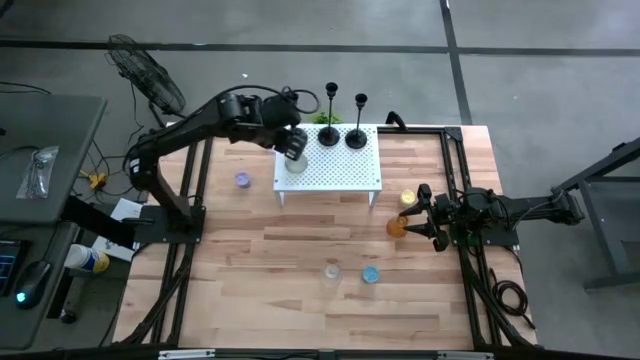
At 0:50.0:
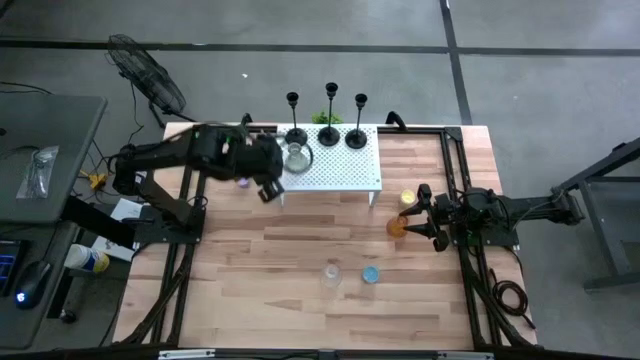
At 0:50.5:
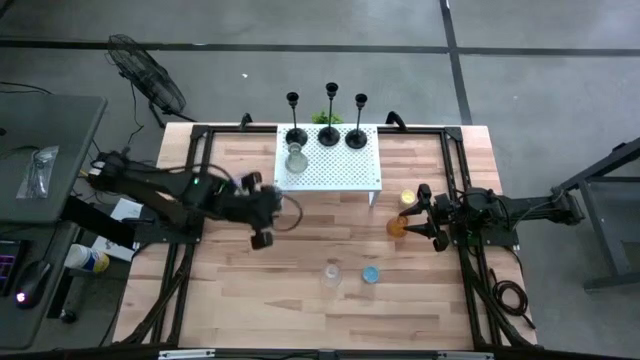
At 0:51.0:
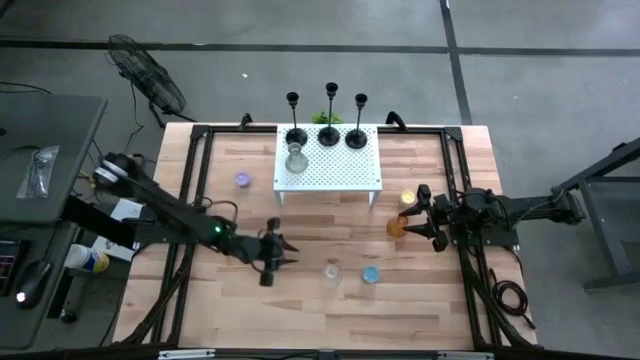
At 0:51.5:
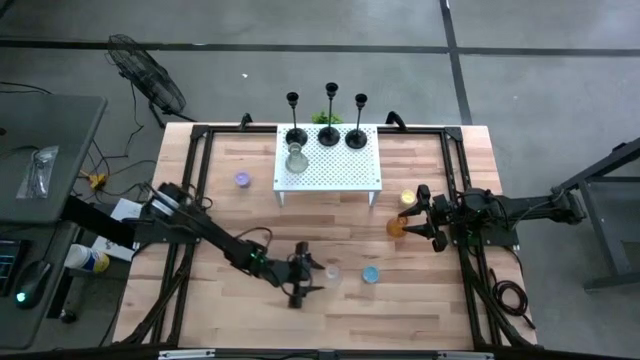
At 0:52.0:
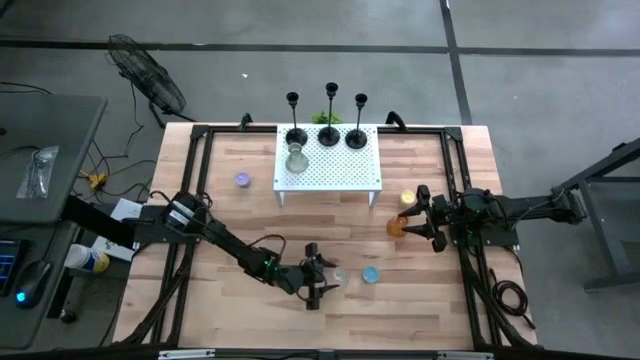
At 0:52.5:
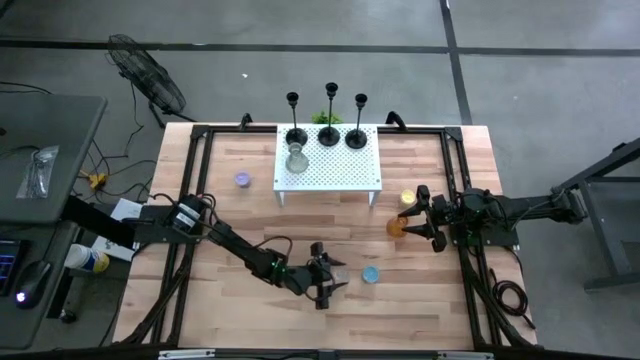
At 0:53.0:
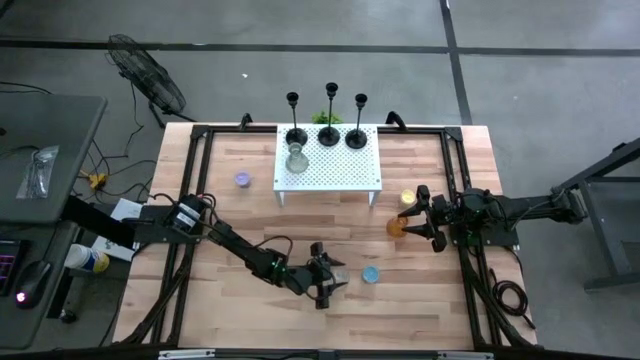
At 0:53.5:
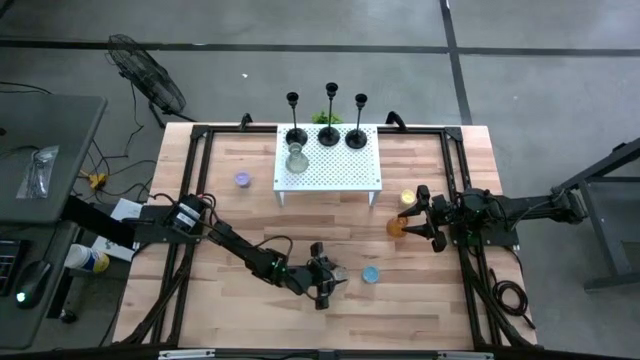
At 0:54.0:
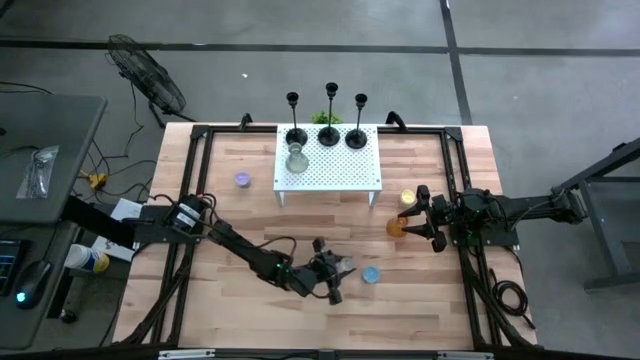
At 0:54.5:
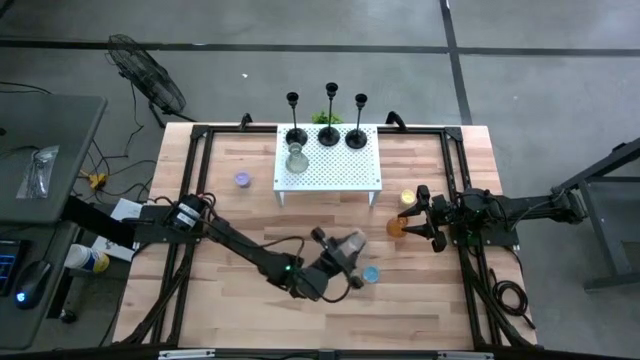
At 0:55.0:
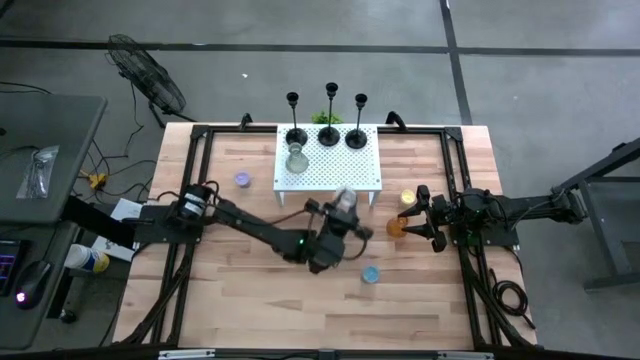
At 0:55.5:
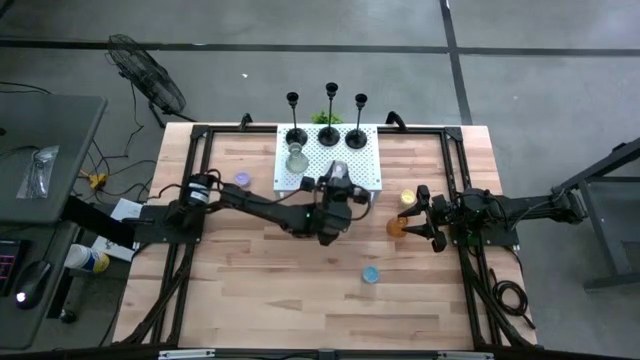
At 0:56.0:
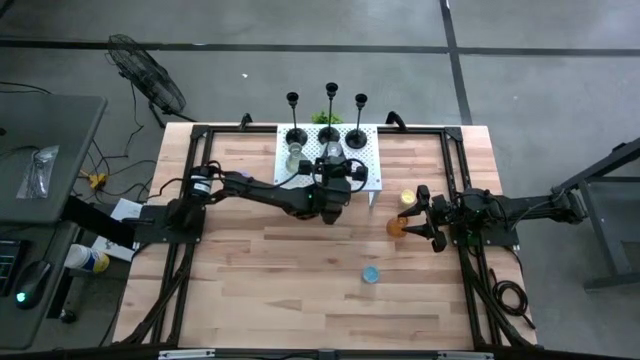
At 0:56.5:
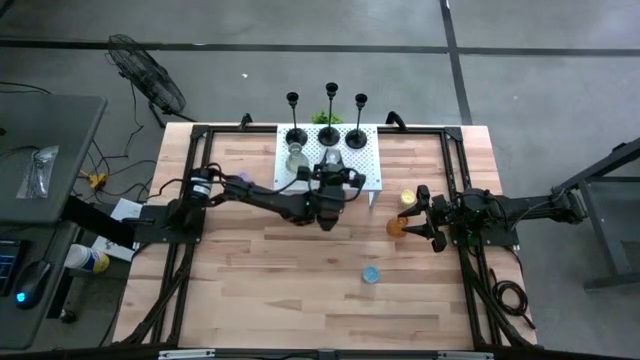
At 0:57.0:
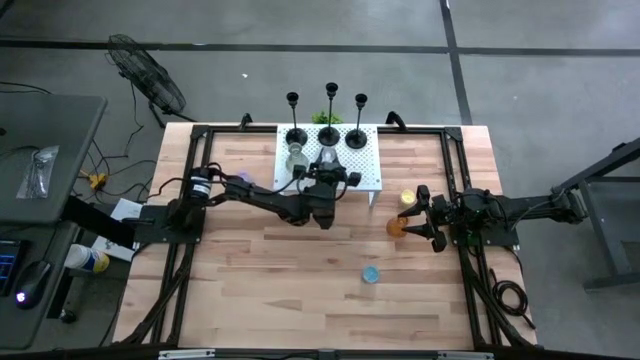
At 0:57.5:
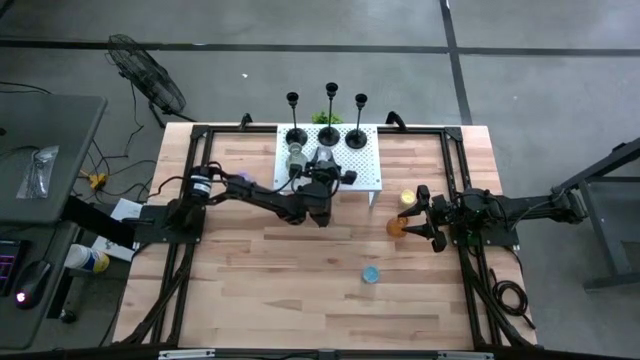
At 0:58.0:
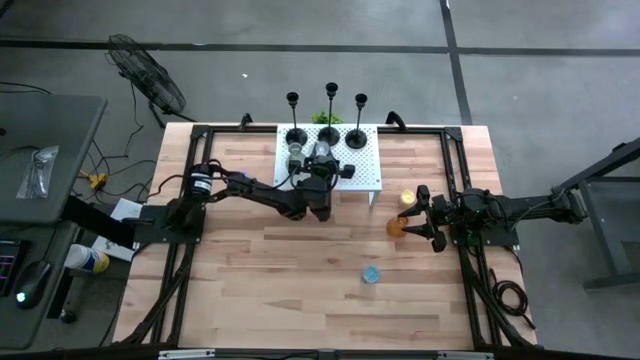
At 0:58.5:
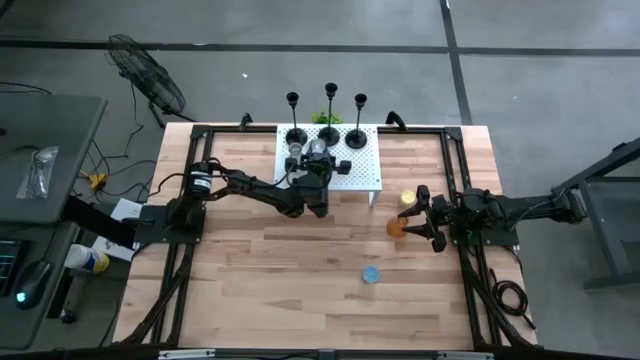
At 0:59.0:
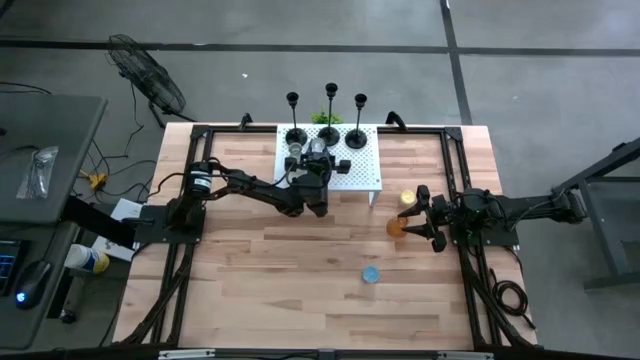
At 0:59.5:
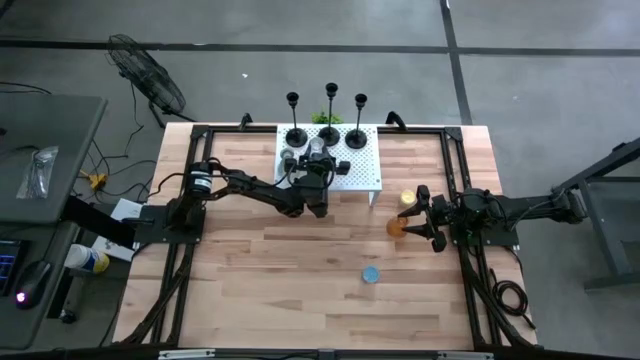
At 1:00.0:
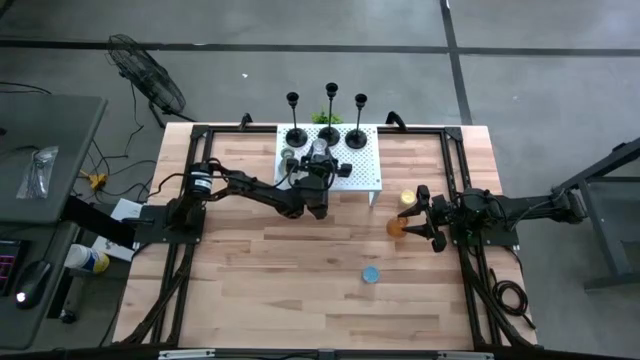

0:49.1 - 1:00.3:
Task: Pick & Place candle stick holders
Put the transparent candle holder on the shelf aligned with the green candle holder

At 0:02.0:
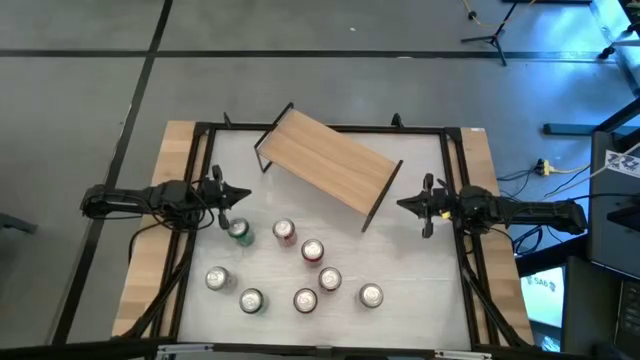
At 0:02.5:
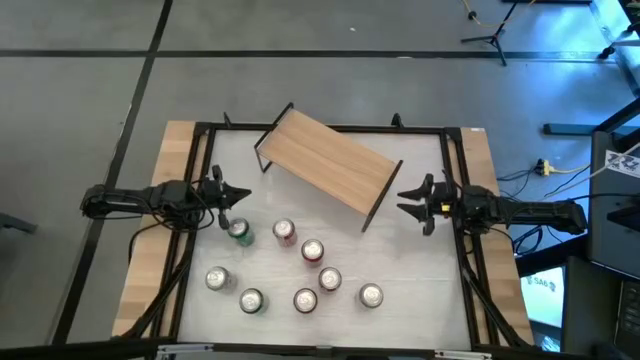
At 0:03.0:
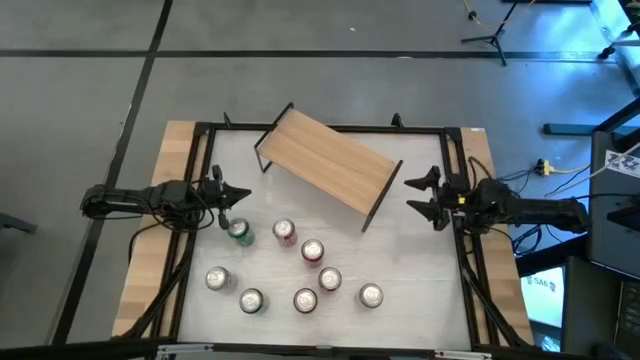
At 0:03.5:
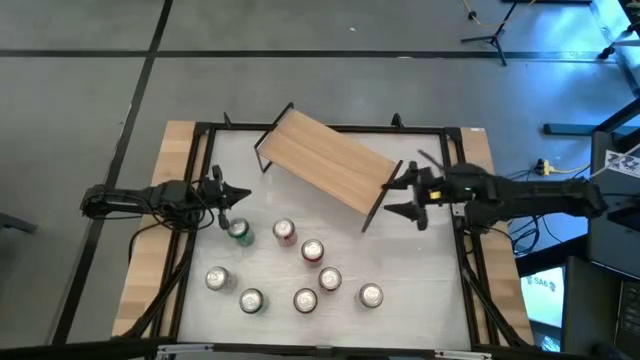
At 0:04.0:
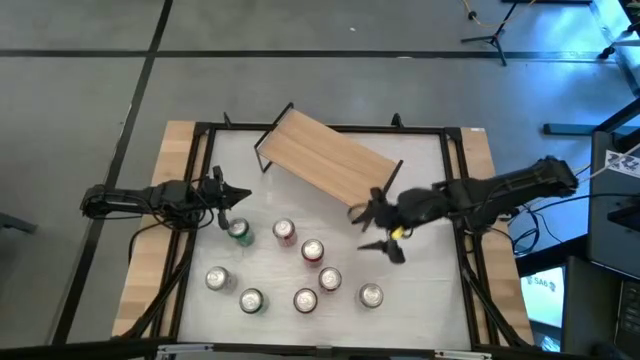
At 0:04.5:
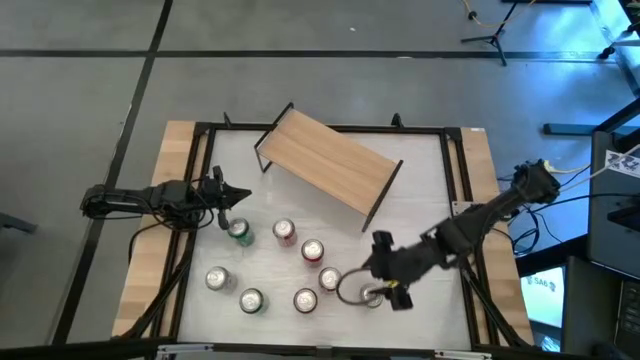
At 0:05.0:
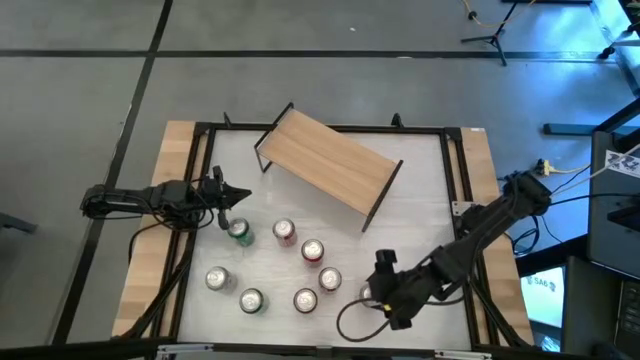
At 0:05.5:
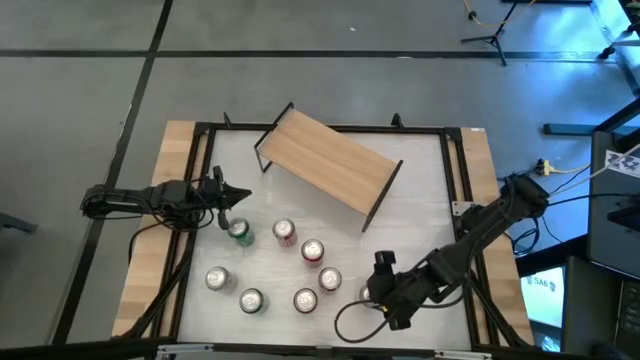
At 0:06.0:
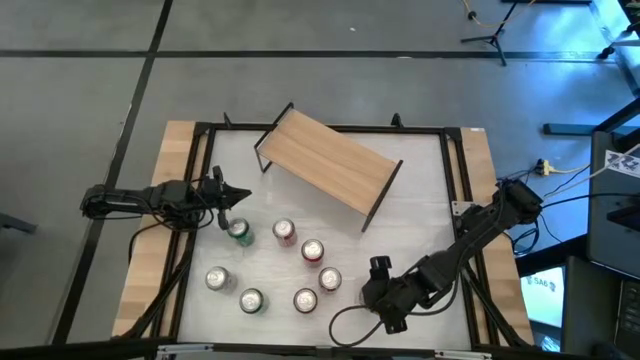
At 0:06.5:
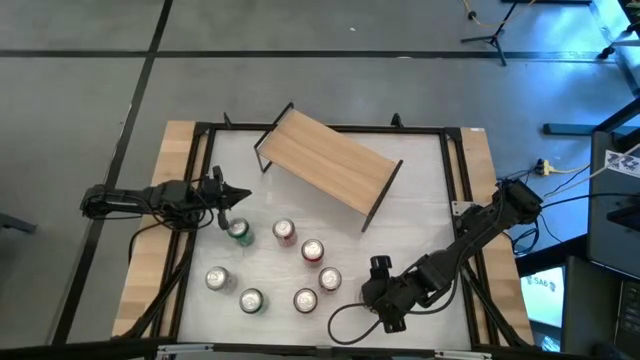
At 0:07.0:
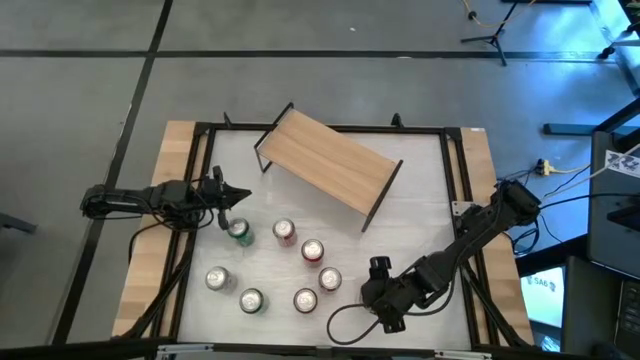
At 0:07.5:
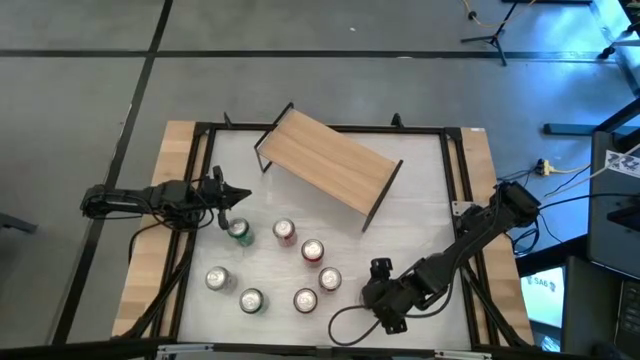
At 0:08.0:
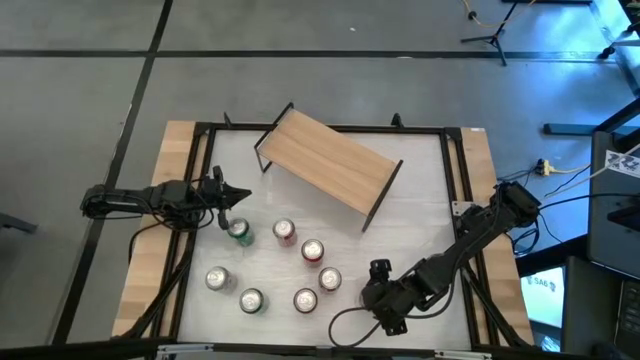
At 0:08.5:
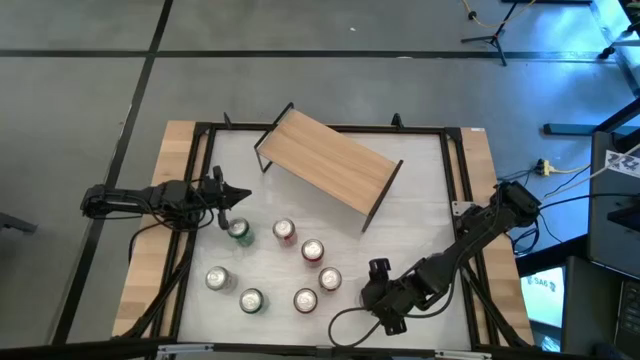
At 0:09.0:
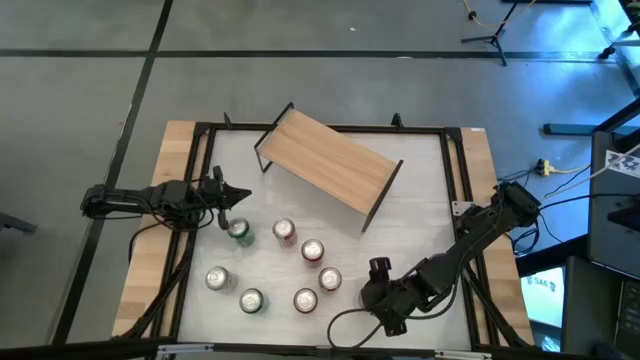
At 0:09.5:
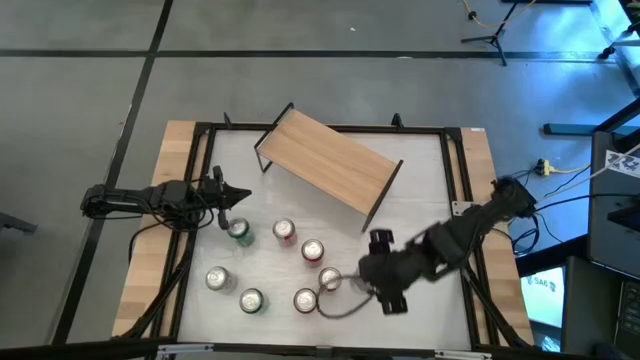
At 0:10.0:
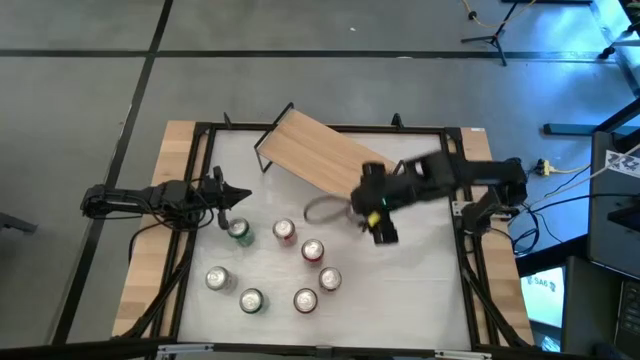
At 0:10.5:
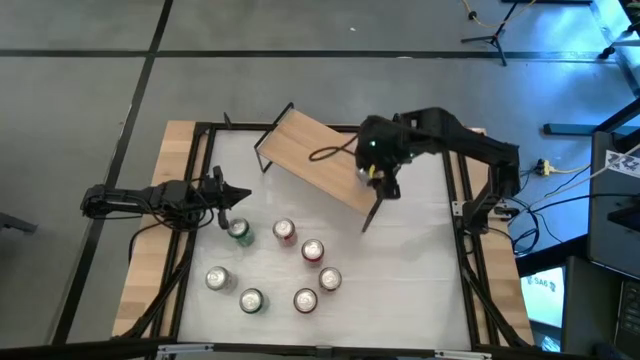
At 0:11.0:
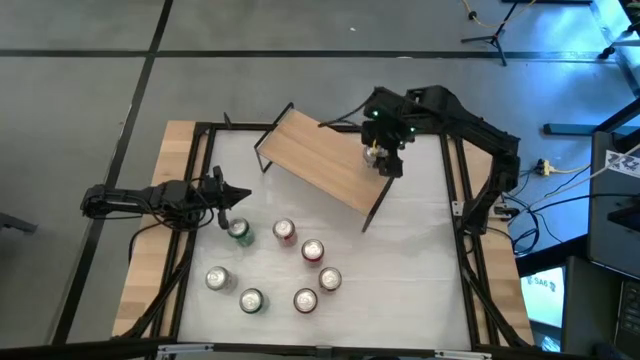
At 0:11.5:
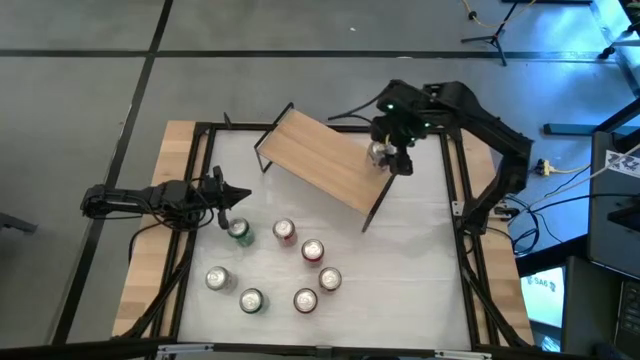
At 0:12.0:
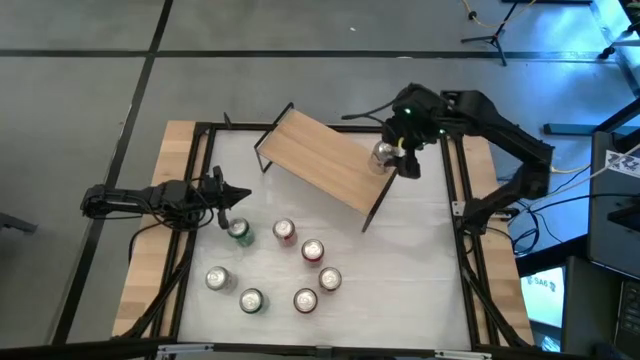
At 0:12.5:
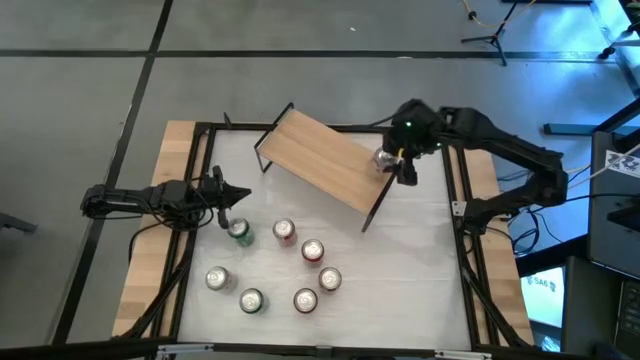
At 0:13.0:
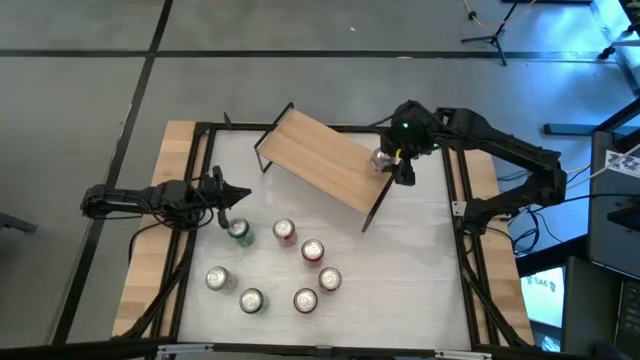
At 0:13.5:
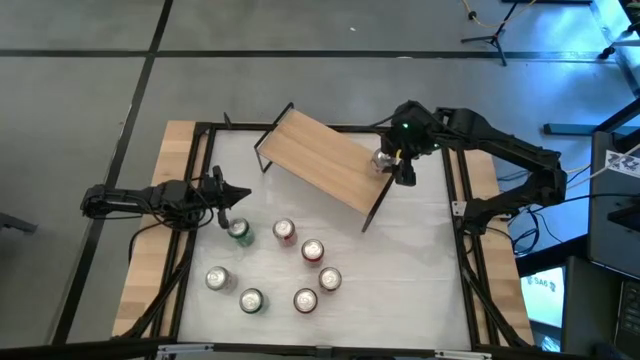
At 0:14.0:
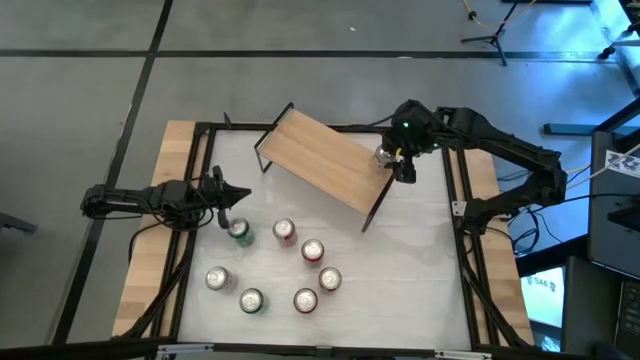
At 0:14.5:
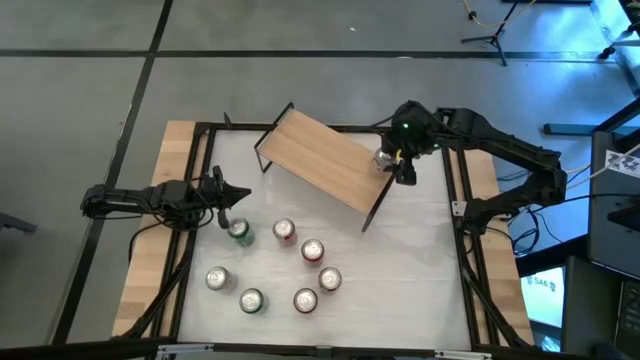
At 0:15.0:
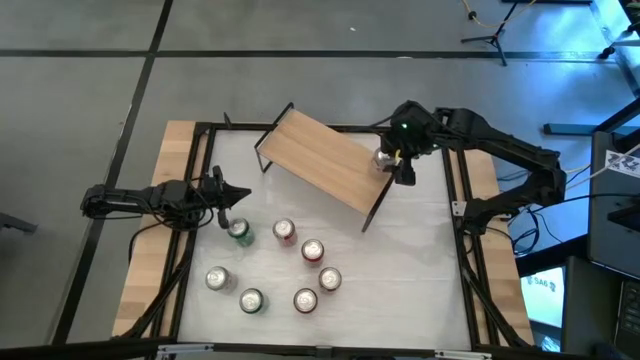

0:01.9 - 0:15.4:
Task: Place canned beverage on shelf
Put the right red-silver soda can on the shelf
